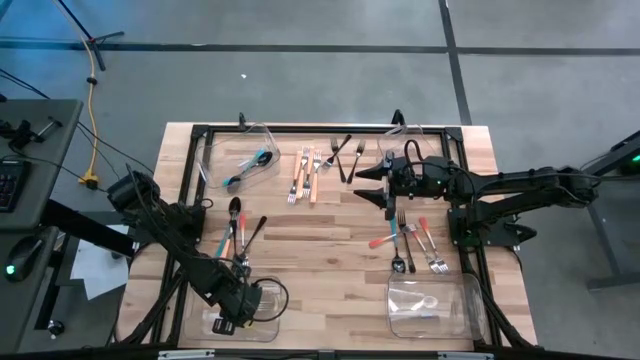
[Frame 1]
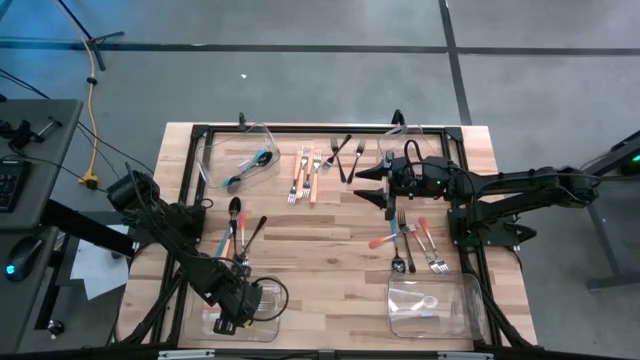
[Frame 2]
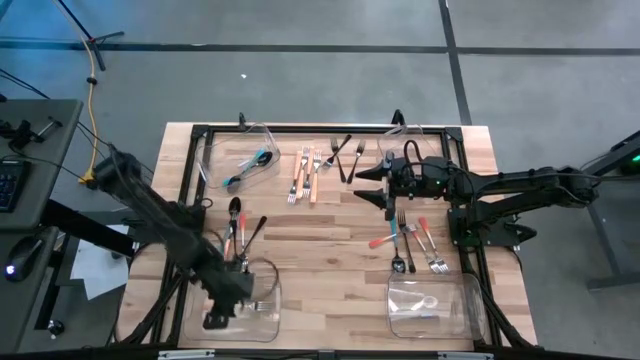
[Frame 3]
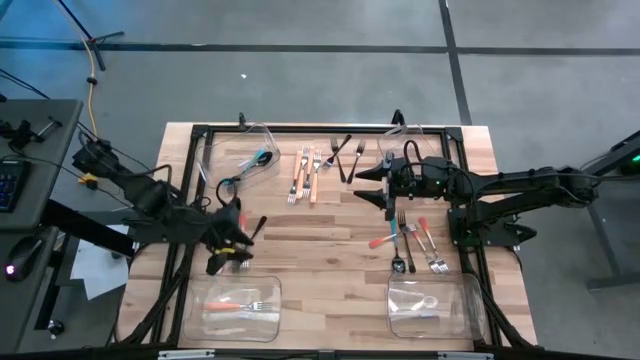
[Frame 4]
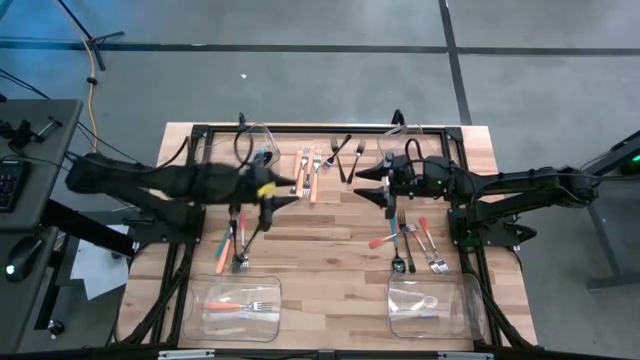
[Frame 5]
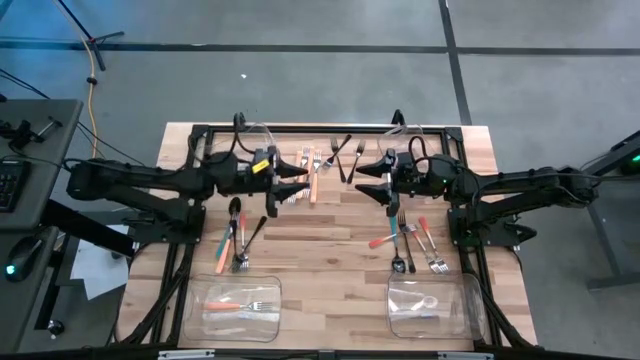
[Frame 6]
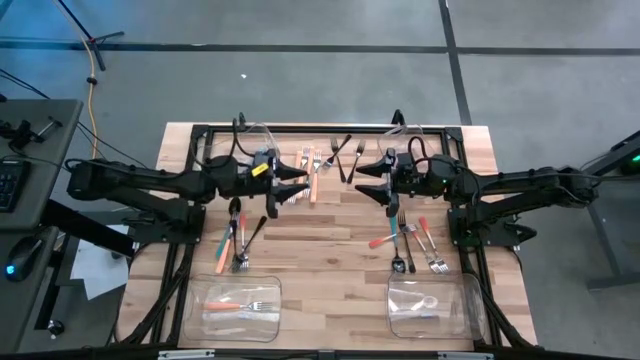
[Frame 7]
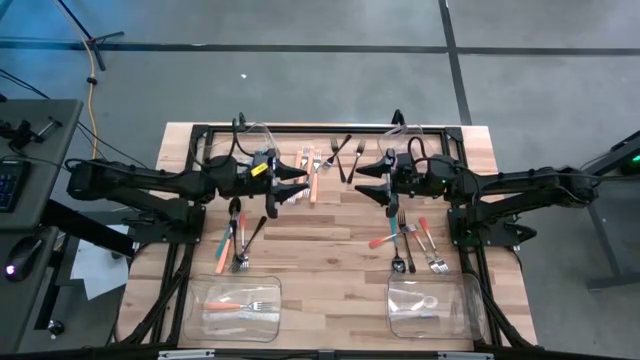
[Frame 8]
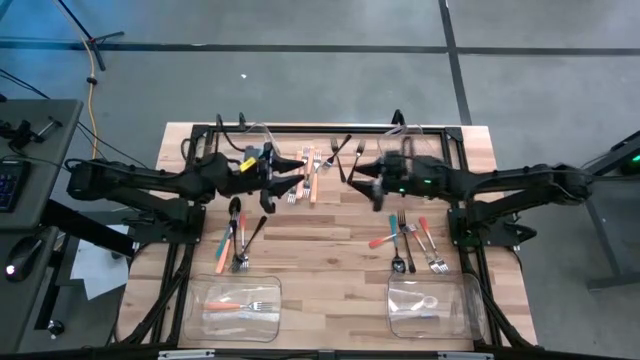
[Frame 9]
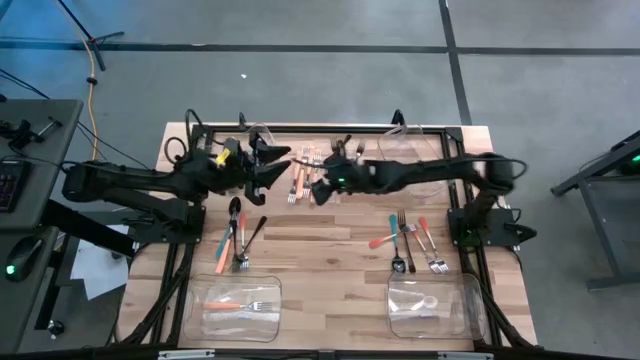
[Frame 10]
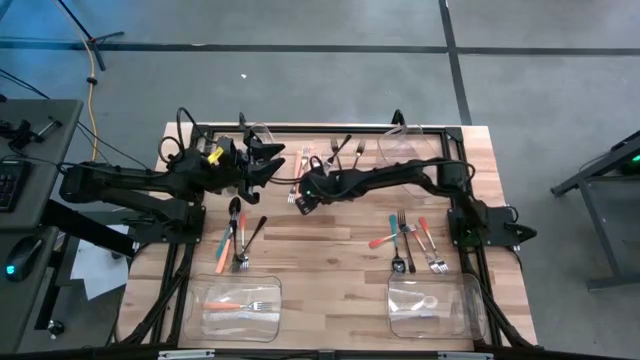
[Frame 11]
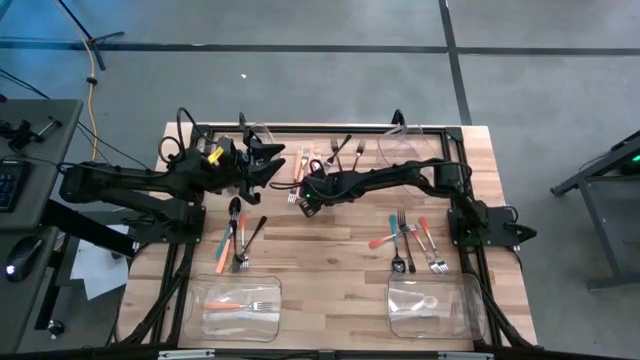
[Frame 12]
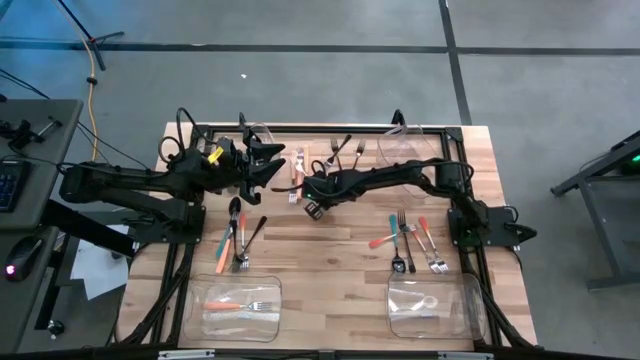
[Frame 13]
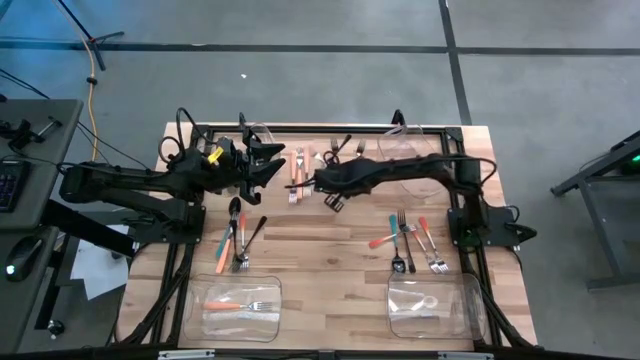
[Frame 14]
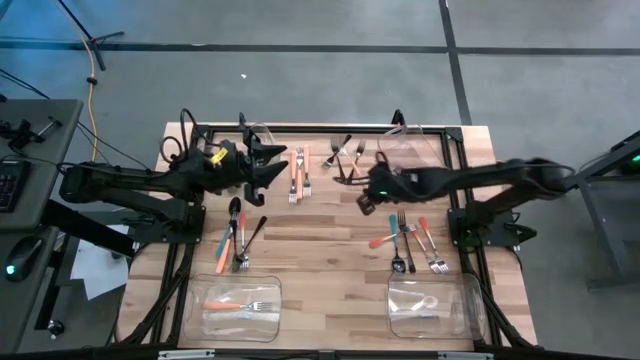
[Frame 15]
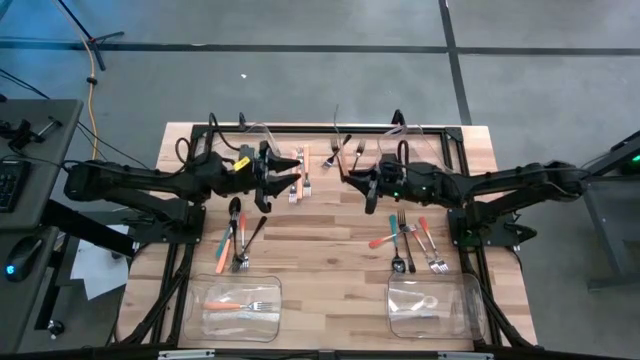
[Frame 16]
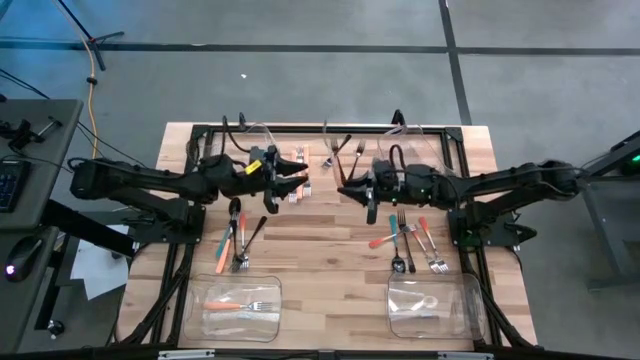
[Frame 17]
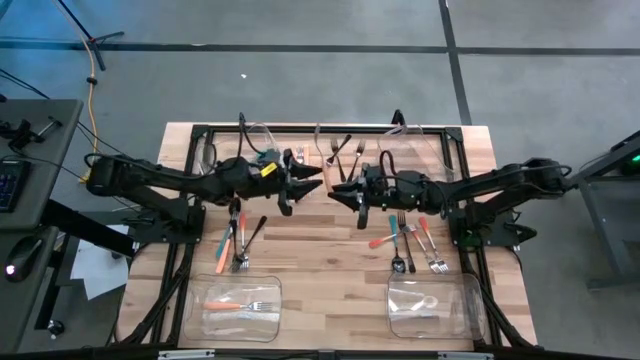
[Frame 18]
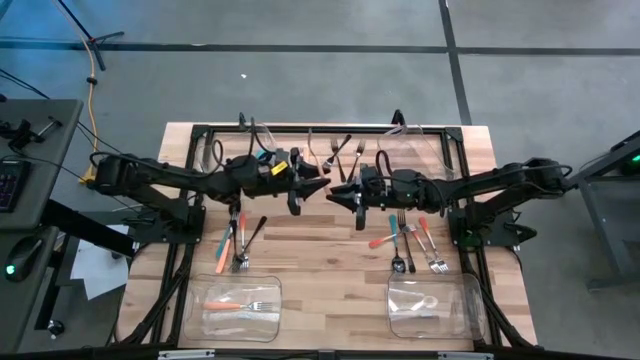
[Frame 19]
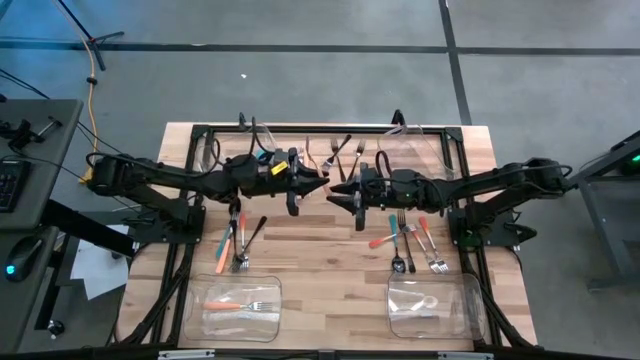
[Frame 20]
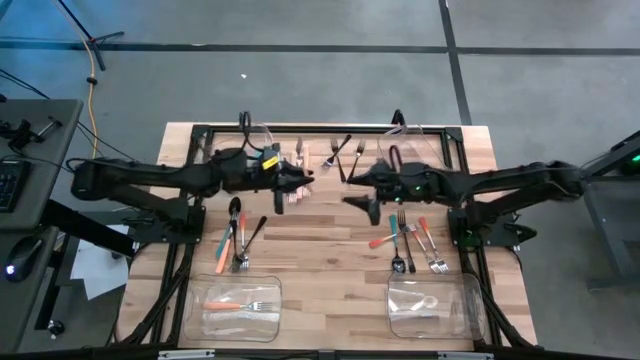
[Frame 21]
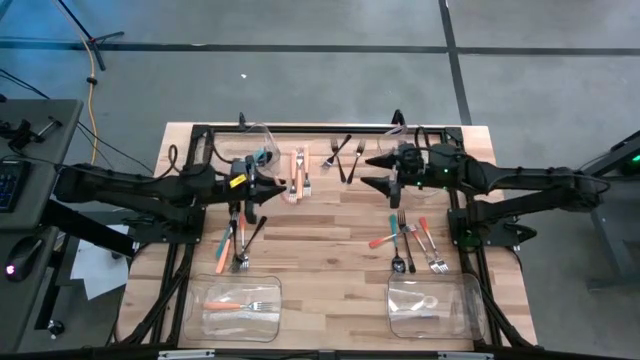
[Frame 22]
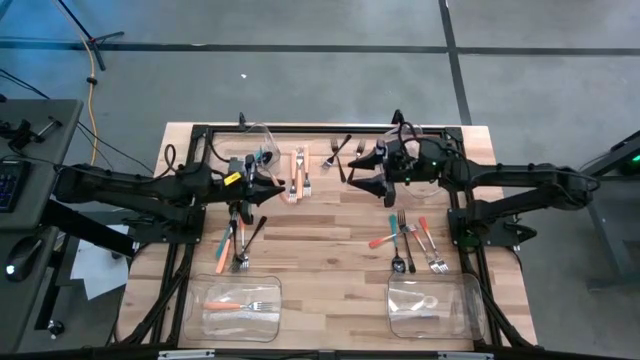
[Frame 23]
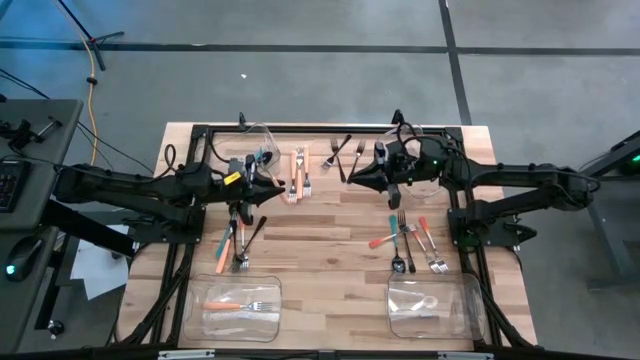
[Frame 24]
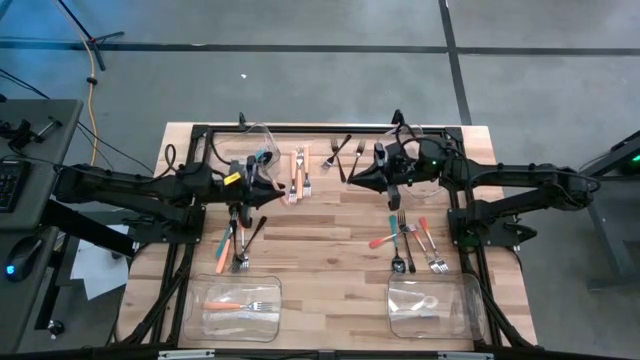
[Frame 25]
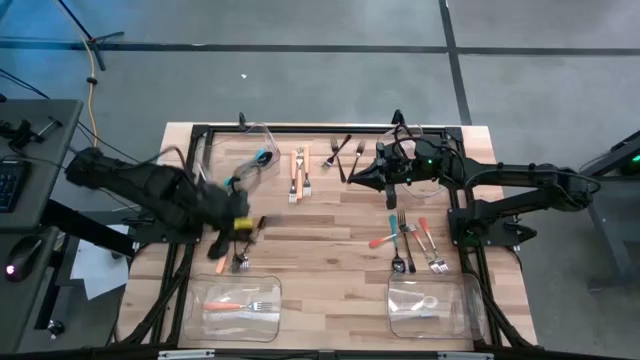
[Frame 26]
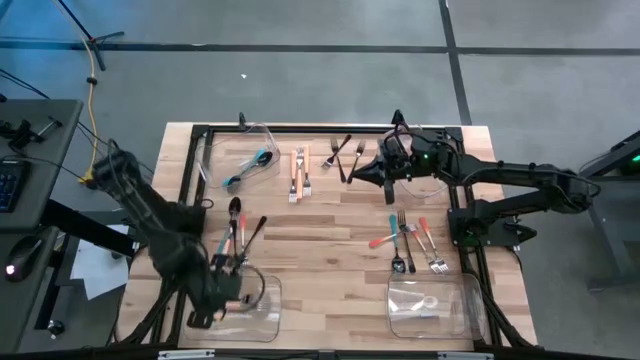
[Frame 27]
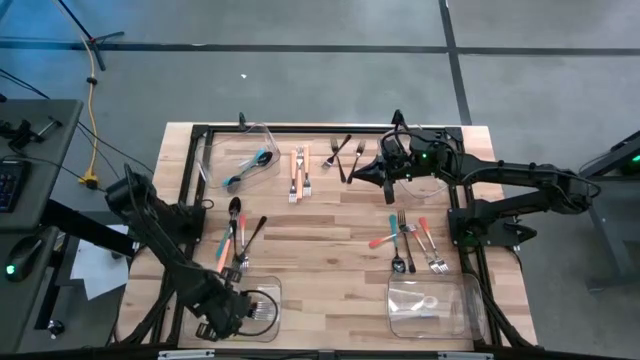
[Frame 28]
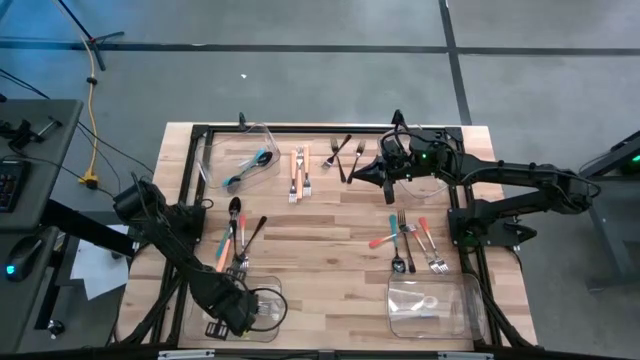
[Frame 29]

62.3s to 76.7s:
Task: Sort silverware by color (type)
Put the light orange fork into the bottom left transparent bin

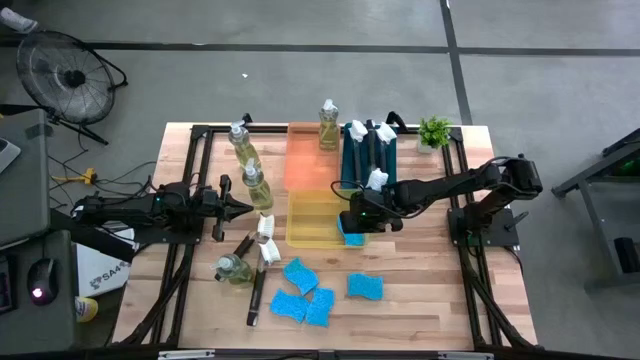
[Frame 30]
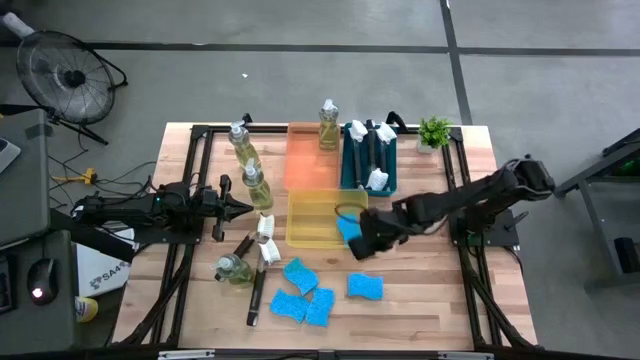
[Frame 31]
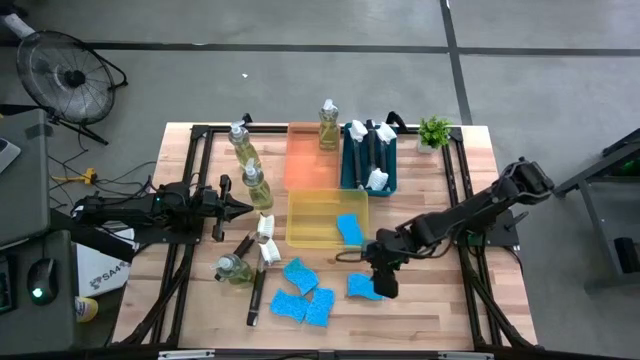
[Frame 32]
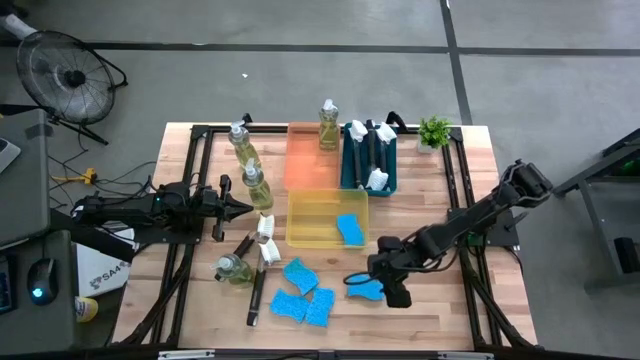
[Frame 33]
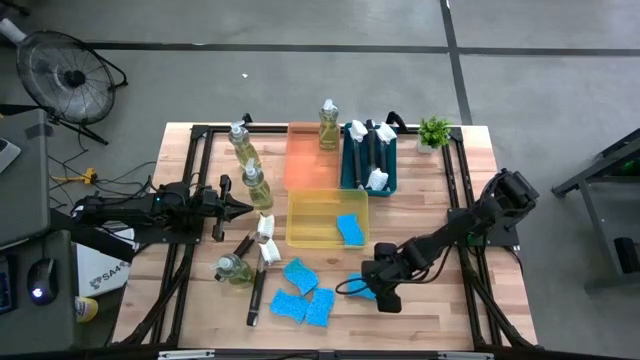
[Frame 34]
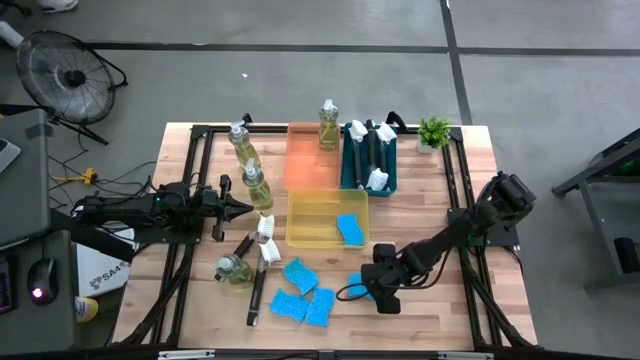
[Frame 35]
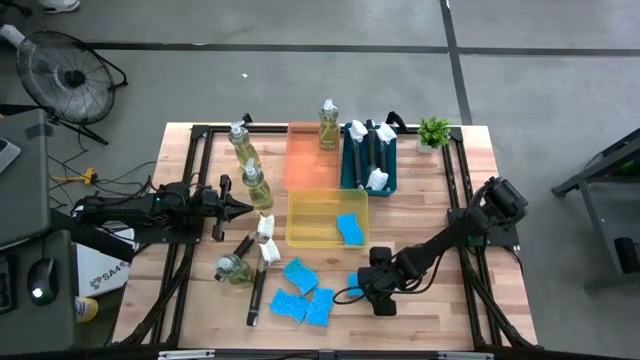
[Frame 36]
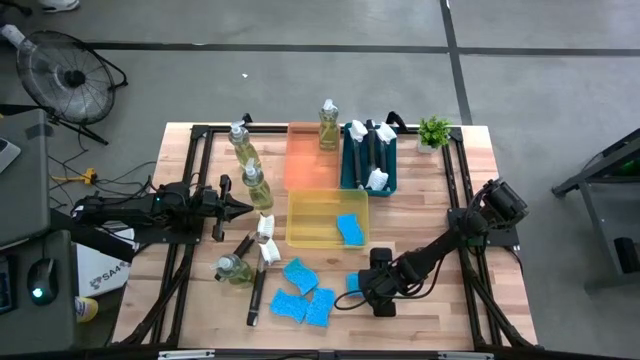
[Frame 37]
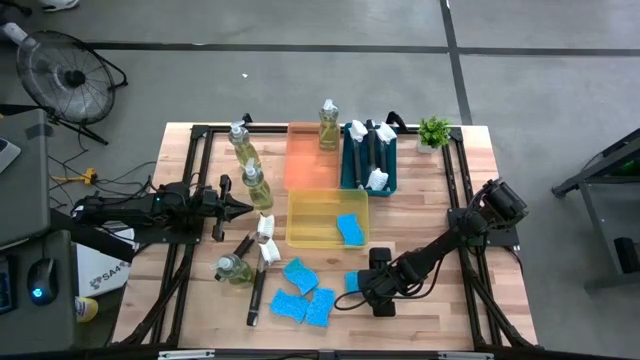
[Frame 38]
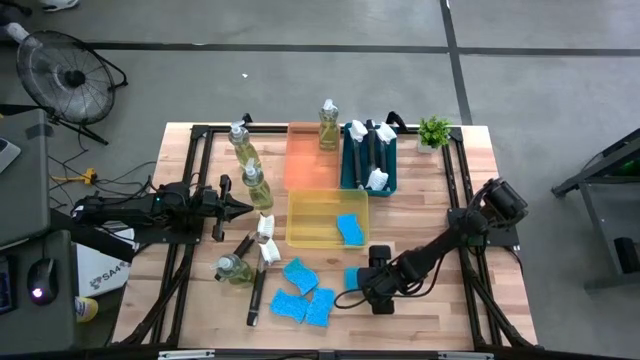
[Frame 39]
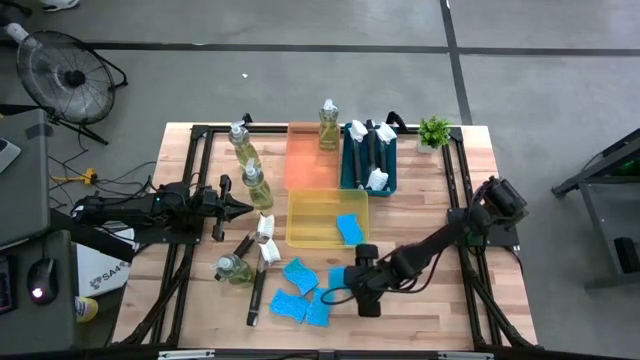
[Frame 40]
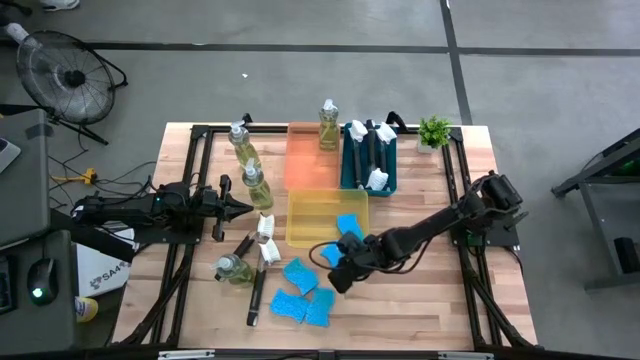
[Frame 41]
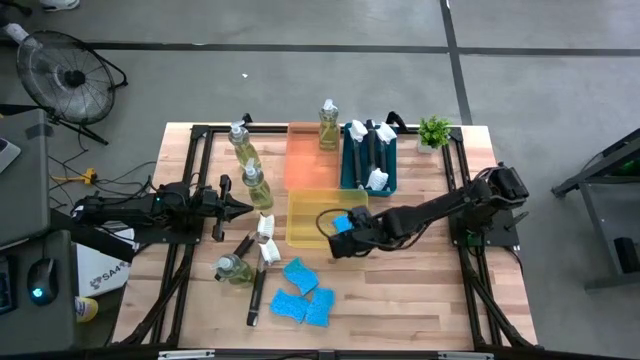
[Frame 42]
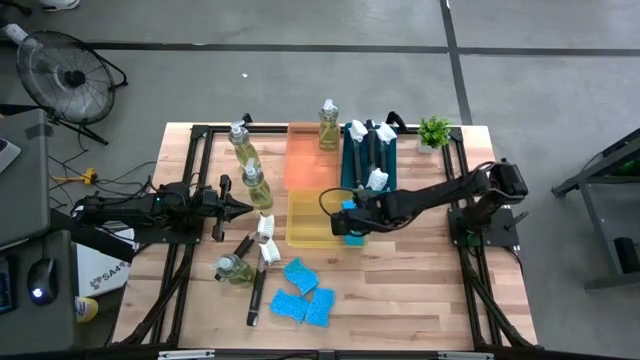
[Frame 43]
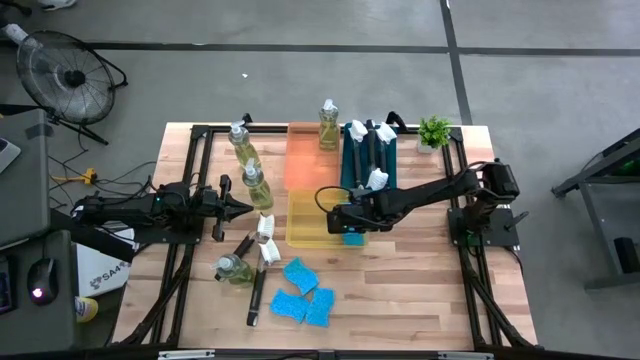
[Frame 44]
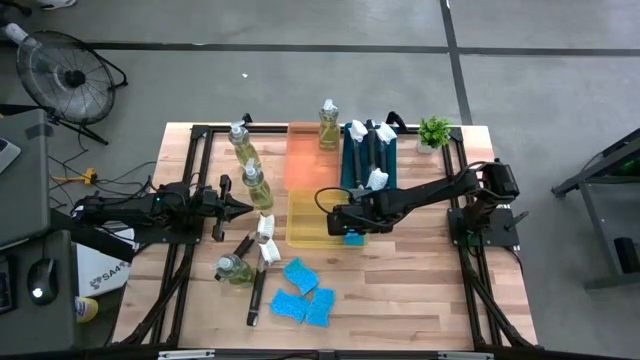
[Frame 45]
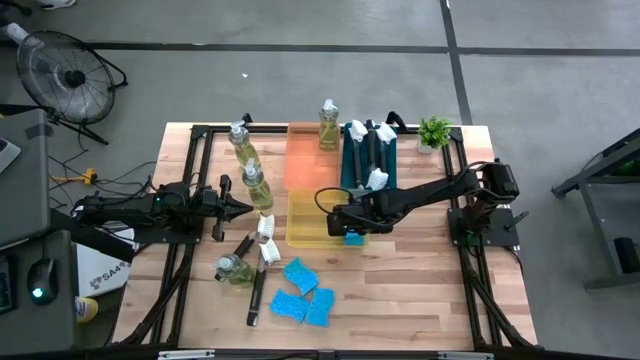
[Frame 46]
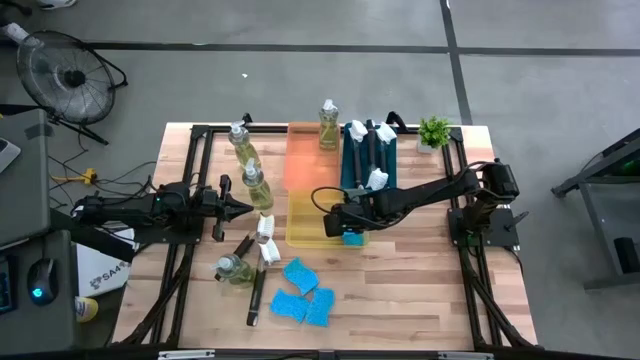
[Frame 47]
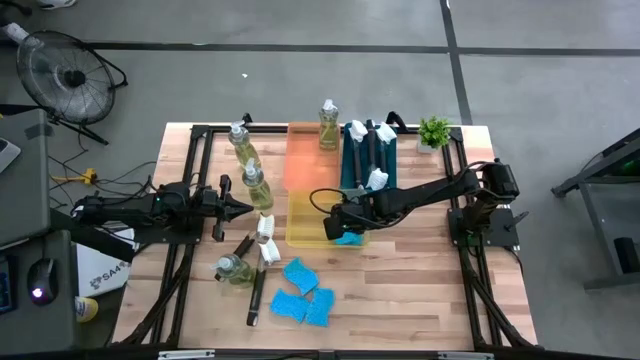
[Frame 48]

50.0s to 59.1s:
Task: Pick & Place Kitchen Sink Supplies
Stack the sponge on top of the sponge in the yellow bin
